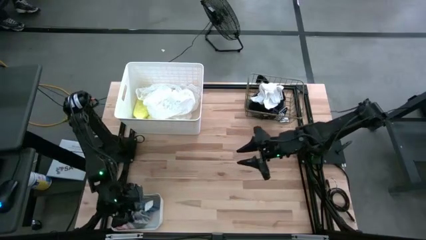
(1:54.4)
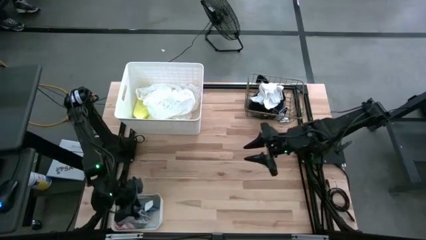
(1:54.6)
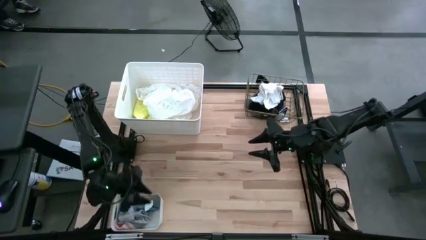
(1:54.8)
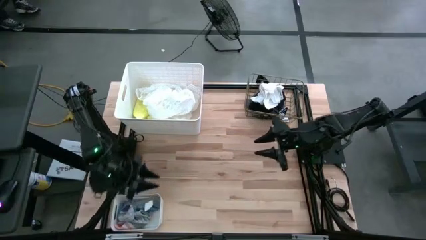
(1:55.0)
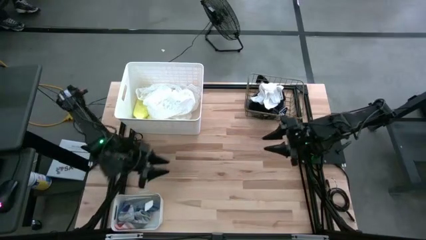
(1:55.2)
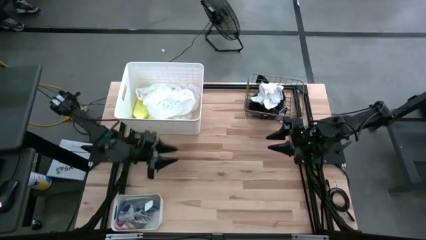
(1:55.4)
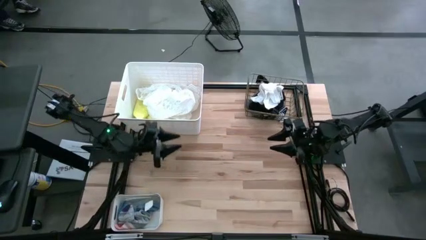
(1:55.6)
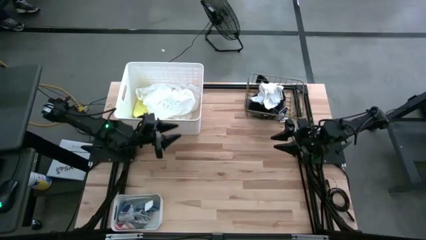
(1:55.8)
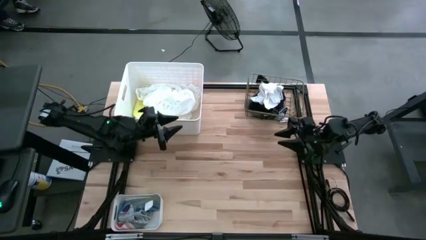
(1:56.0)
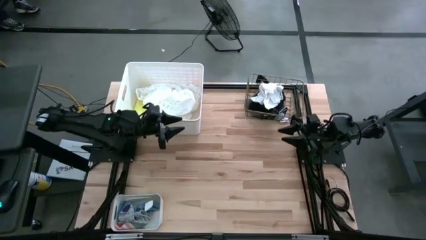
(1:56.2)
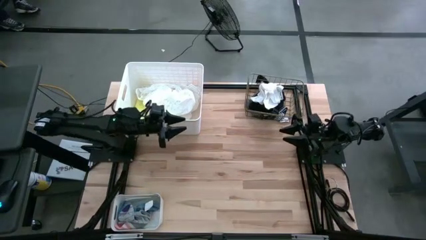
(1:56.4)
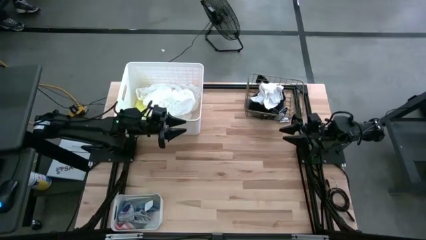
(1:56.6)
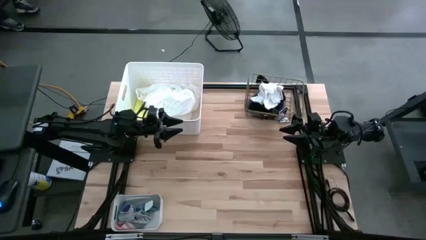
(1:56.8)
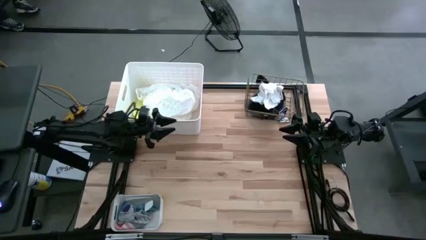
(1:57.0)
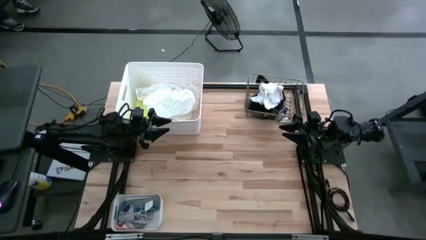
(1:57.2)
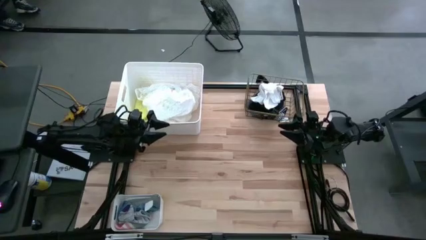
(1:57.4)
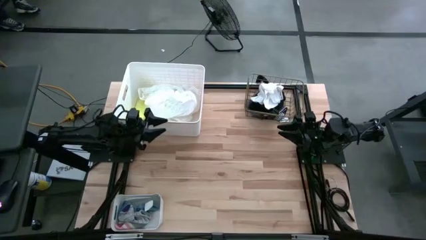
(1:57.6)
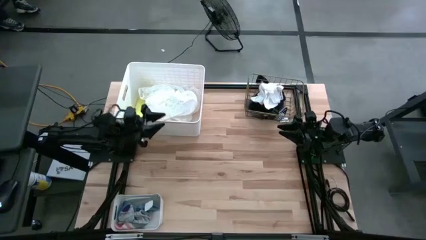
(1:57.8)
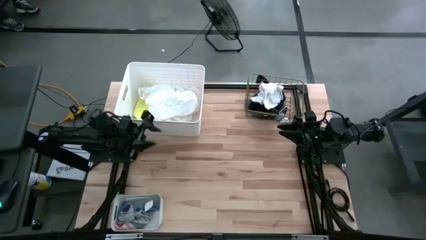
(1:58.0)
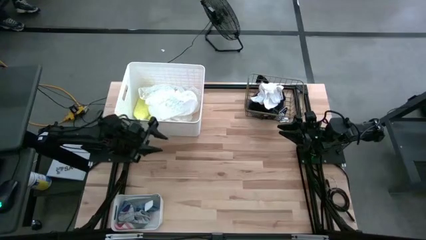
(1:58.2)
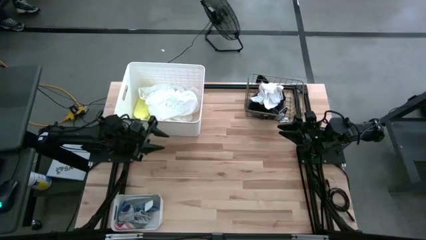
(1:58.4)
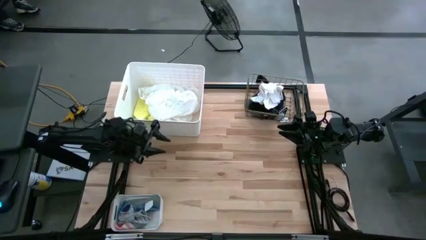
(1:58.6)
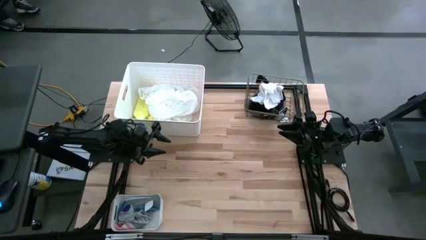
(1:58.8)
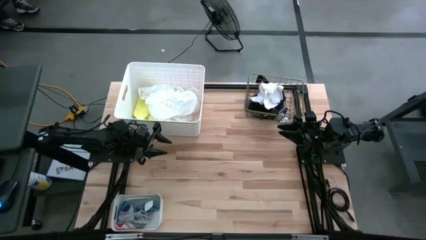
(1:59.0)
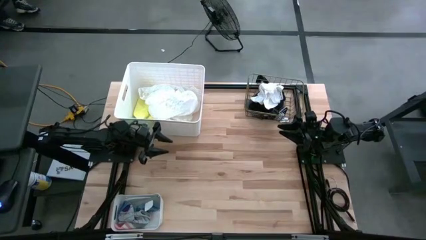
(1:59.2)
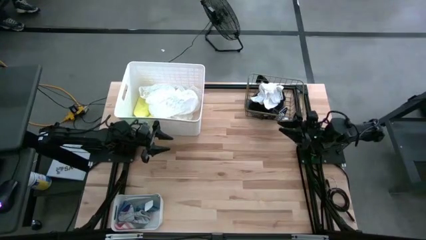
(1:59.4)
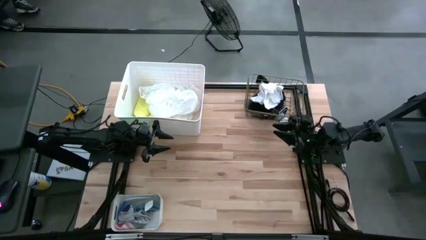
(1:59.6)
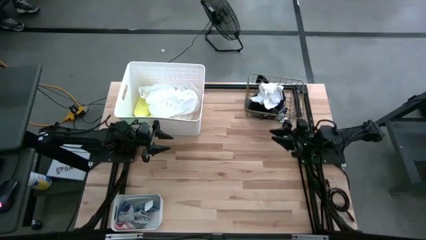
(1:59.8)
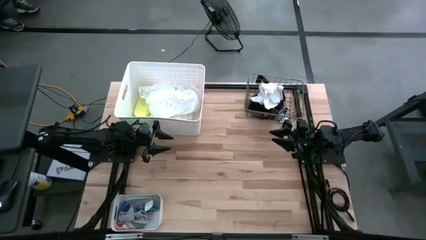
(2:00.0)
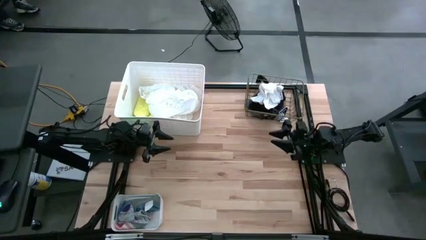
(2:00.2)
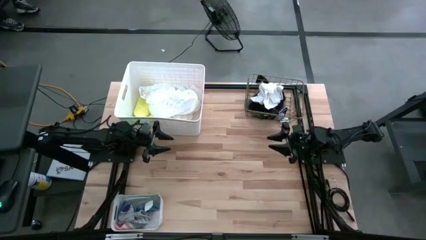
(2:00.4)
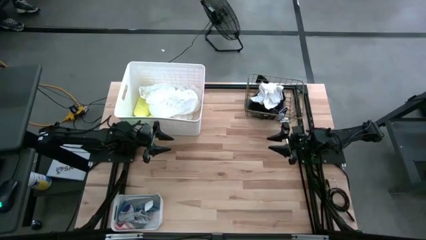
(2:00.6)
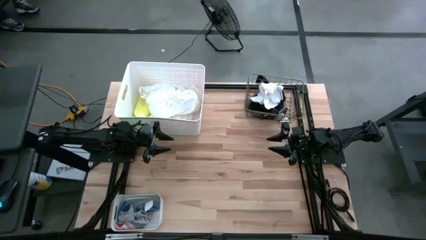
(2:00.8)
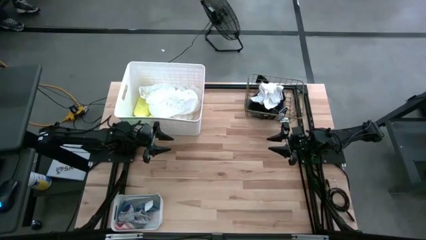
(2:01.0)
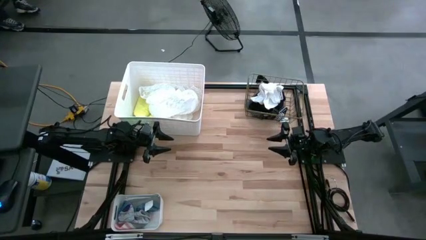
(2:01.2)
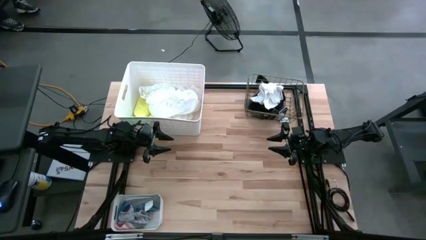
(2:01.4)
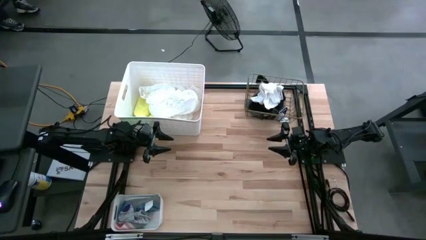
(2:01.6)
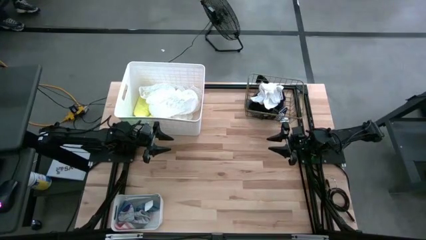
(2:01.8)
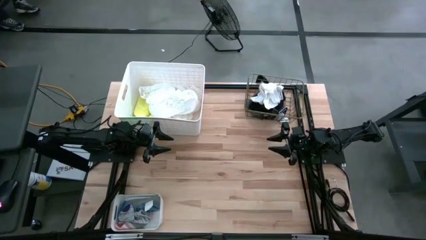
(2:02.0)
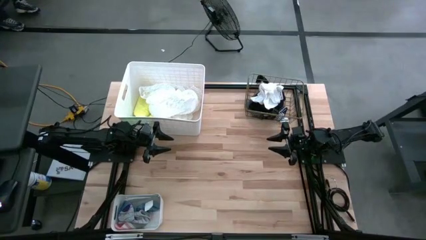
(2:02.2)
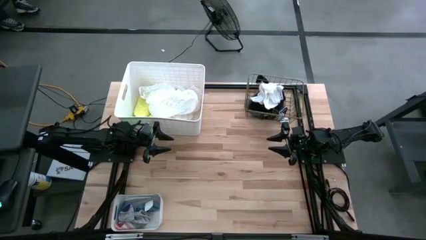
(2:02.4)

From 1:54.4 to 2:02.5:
Task: Pick & Place Cloths
Return to Home Position

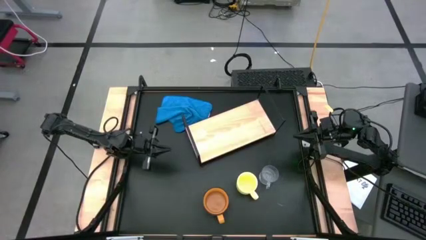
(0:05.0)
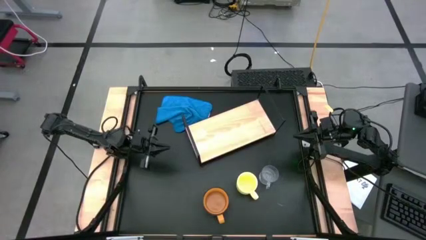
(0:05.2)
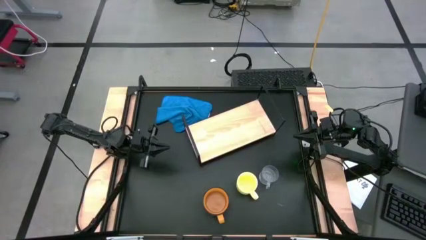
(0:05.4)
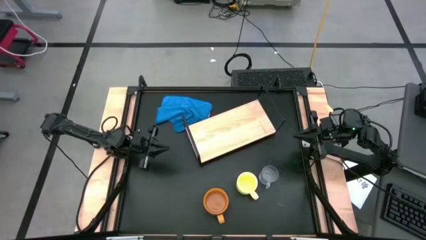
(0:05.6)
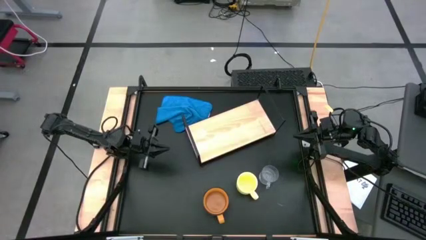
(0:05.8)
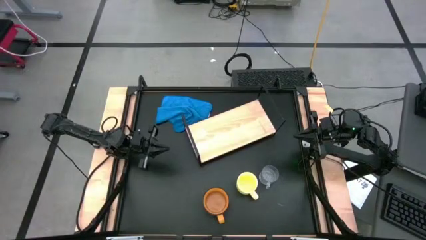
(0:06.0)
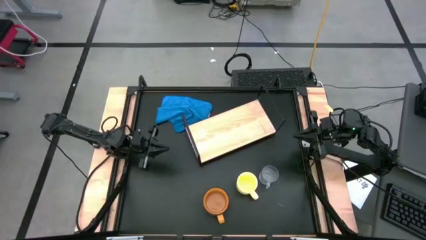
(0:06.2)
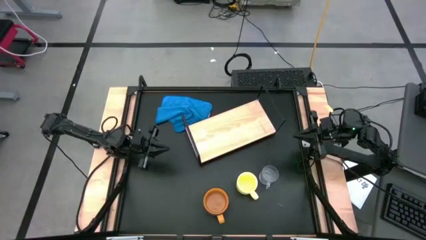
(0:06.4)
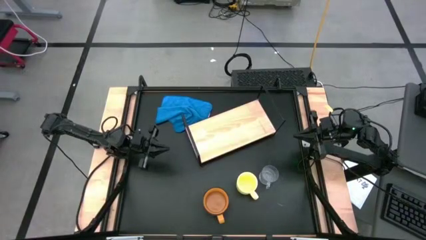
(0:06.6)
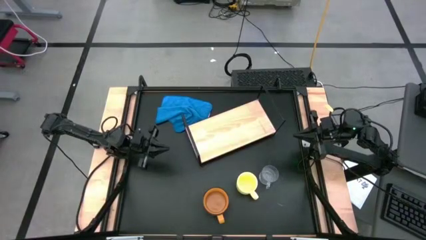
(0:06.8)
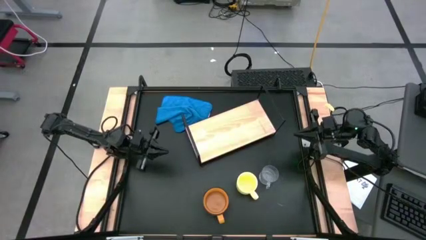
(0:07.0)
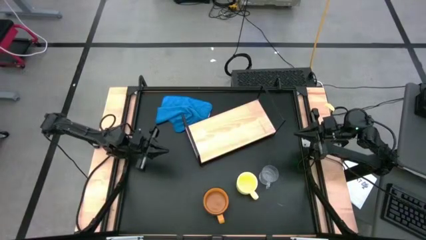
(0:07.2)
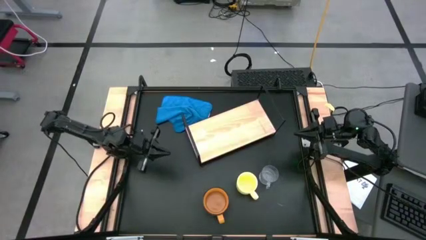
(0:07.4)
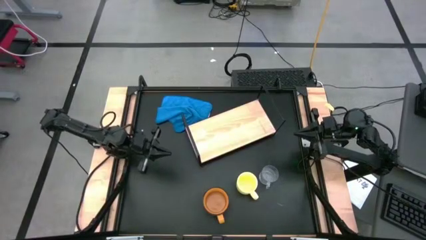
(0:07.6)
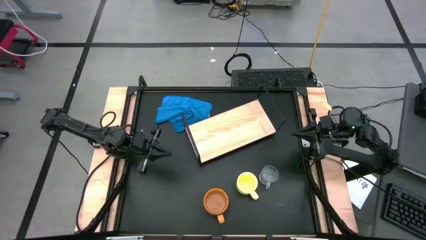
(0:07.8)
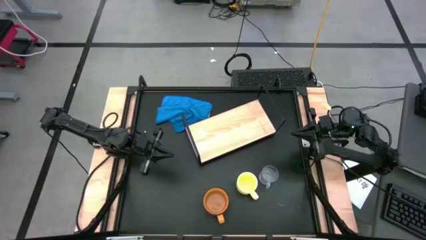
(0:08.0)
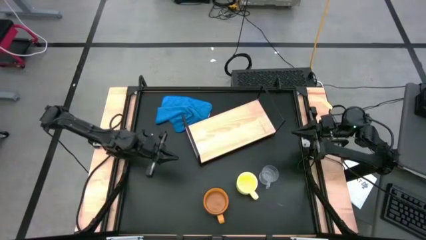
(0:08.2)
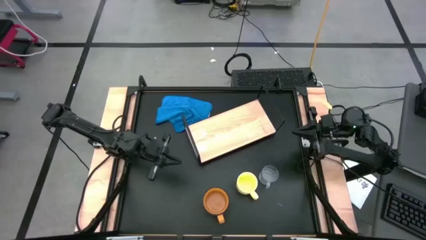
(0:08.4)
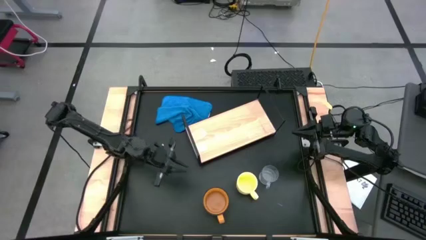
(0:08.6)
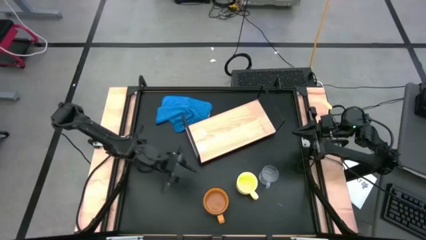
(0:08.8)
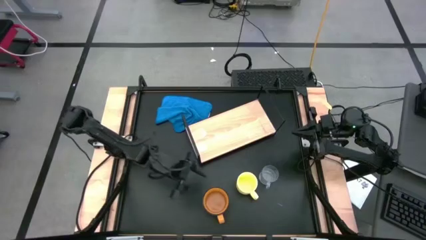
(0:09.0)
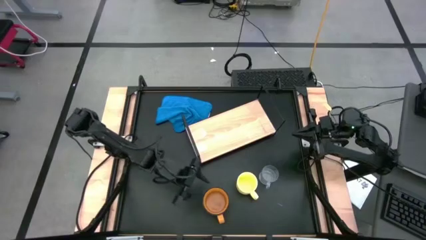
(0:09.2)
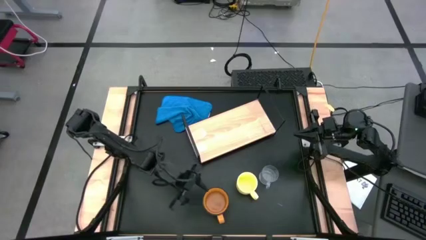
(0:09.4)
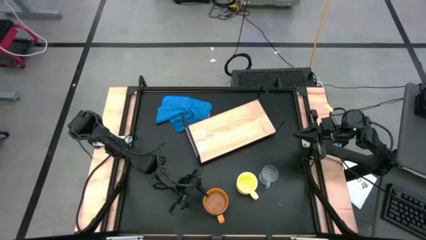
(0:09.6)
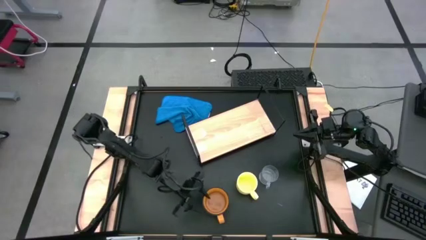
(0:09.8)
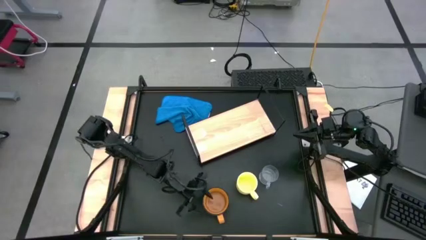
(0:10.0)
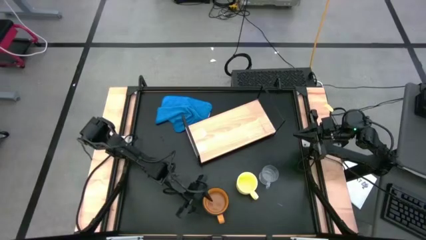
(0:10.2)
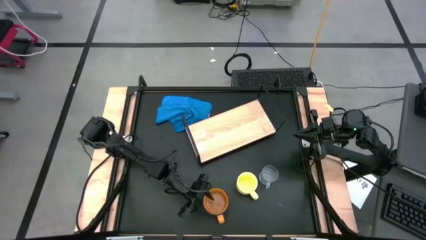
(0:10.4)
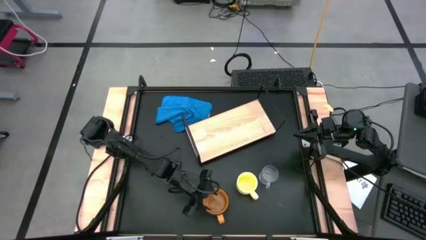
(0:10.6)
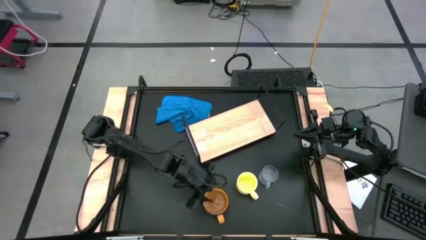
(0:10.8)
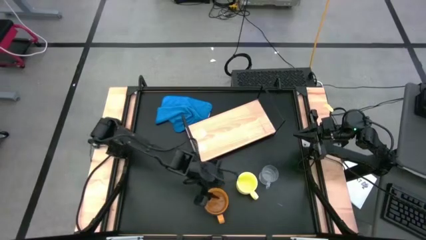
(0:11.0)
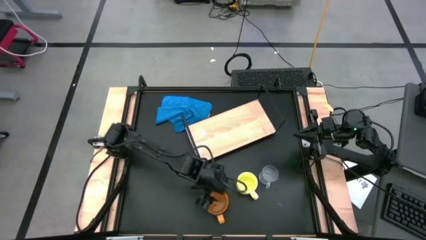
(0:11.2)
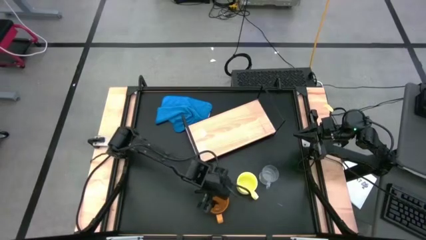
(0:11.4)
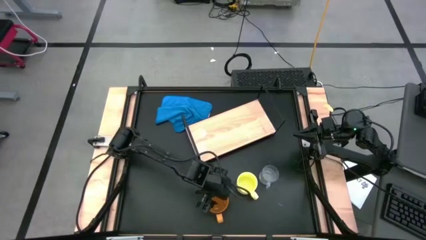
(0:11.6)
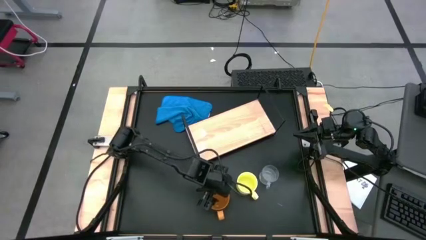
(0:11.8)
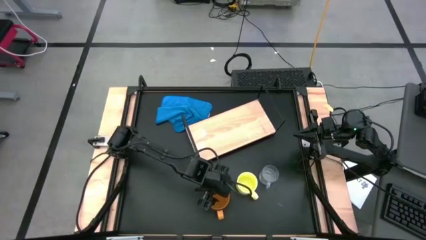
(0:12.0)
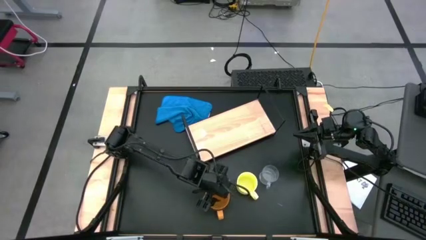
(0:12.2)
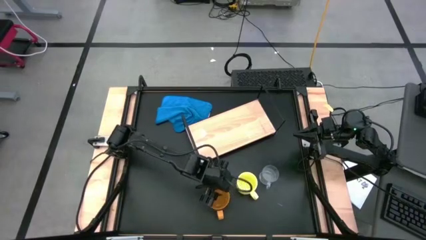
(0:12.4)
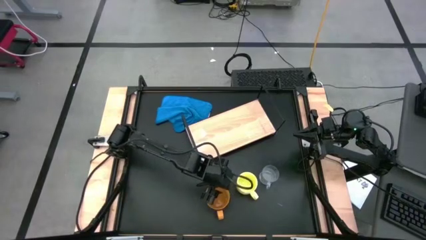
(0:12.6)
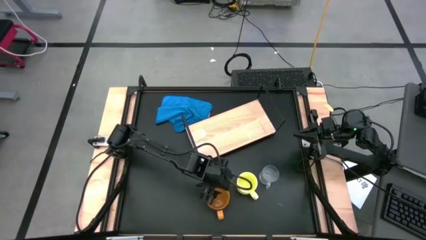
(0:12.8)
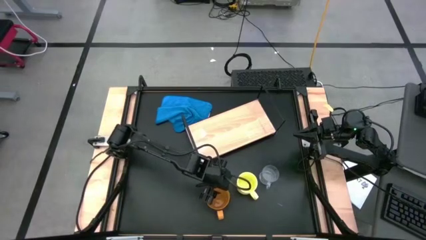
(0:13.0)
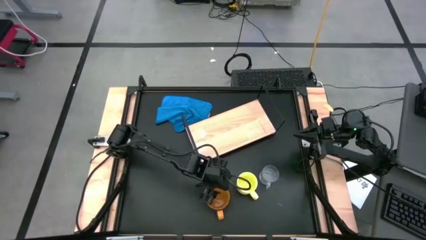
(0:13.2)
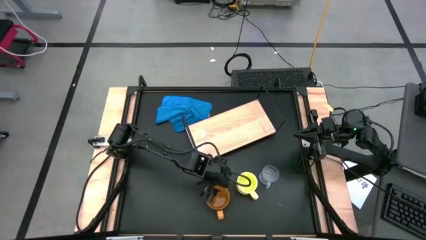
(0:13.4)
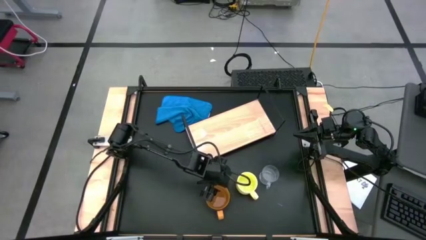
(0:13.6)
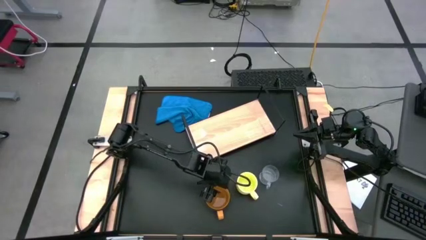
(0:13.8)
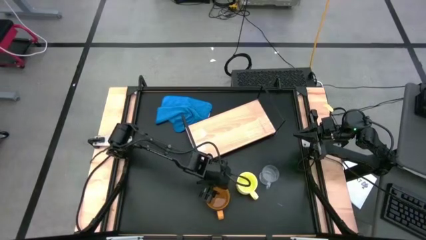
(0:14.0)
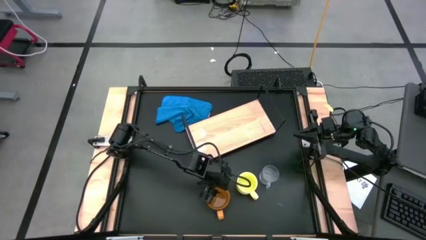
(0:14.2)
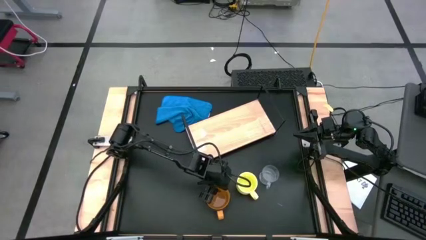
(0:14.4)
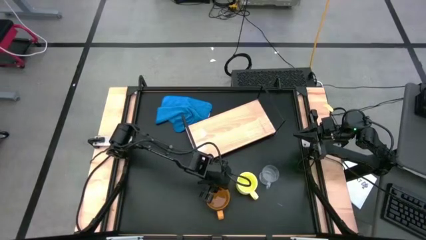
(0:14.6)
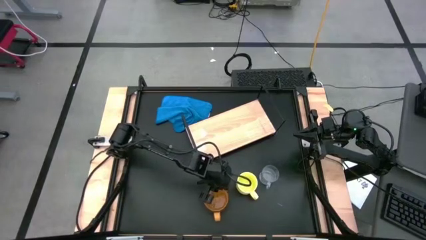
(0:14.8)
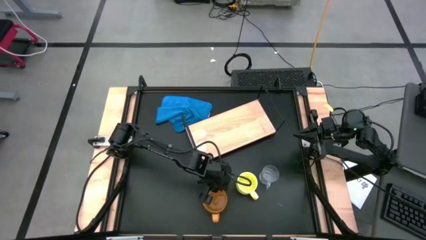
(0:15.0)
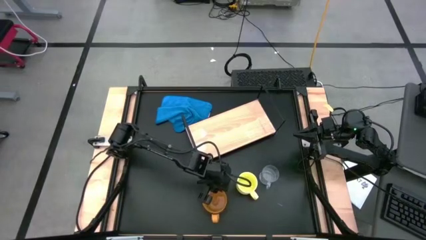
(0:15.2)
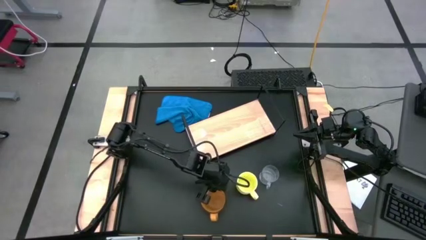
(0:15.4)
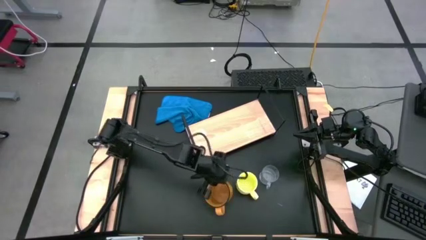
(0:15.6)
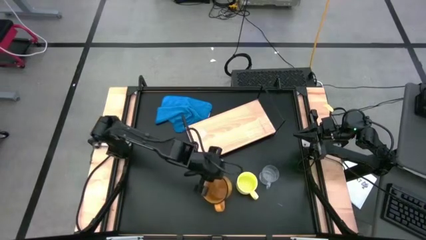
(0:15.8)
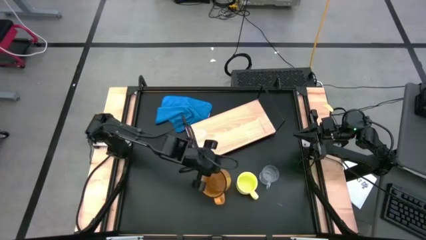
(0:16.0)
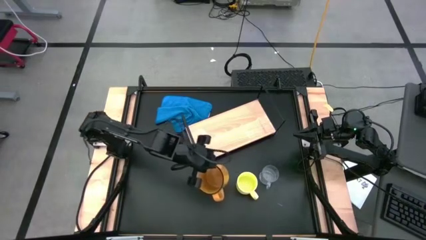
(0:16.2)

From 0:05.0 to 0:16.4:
Task: Stack small to large cups/mugs on shelf
Put the brown mug on the shelf
